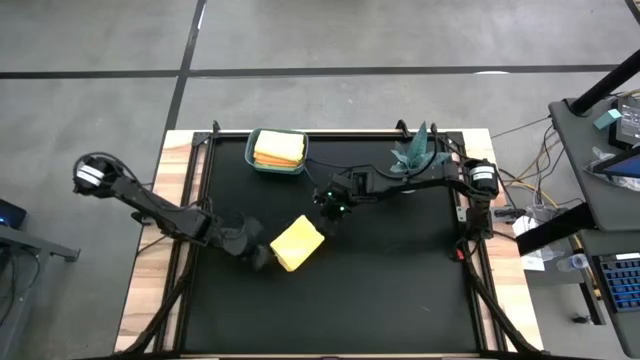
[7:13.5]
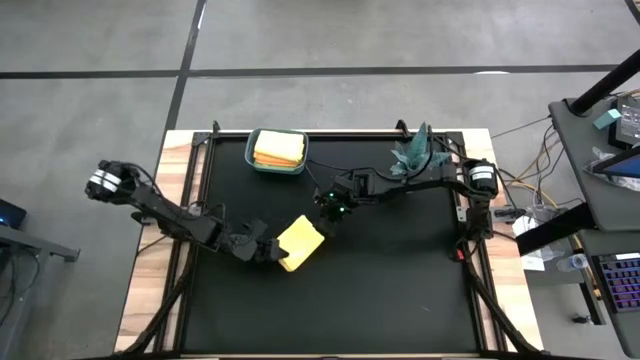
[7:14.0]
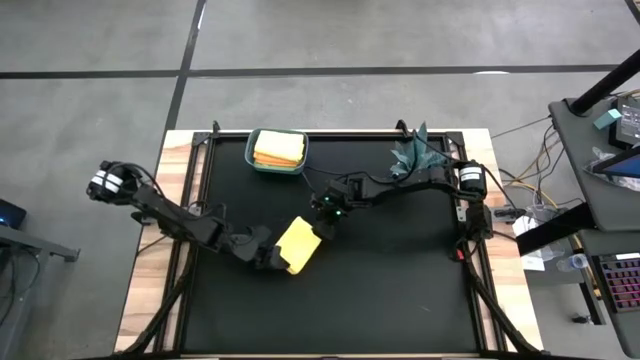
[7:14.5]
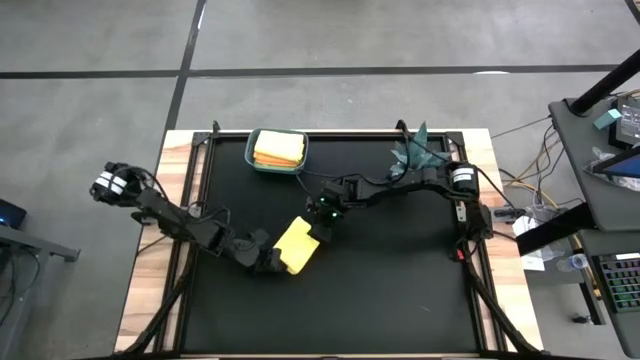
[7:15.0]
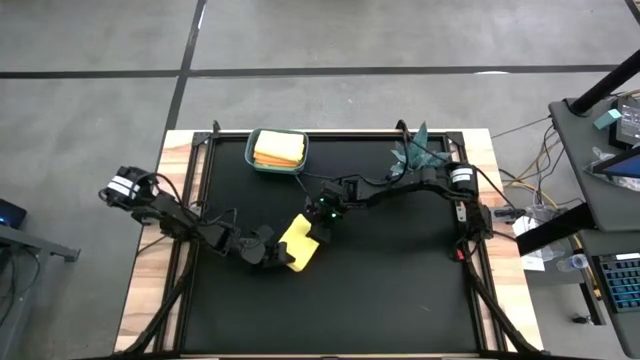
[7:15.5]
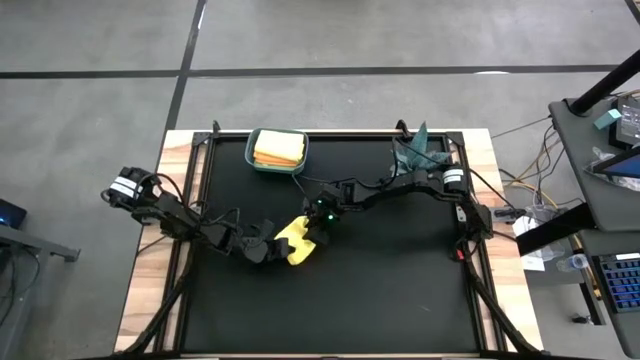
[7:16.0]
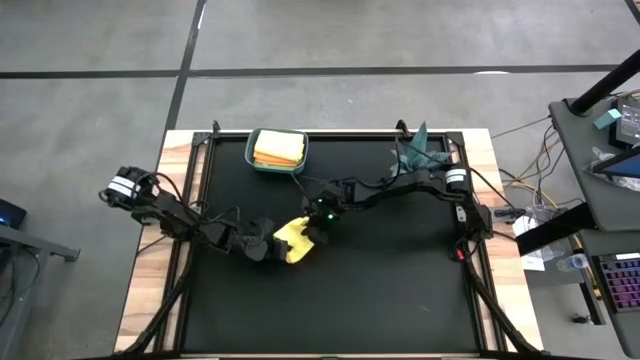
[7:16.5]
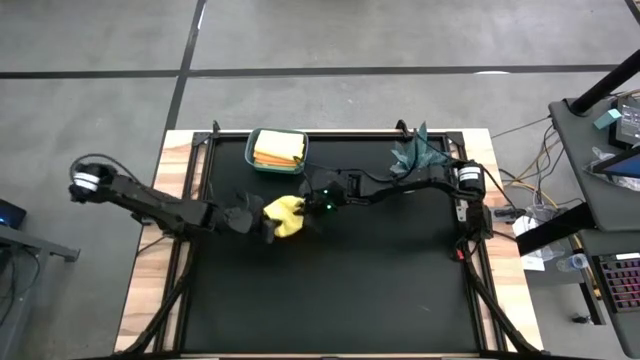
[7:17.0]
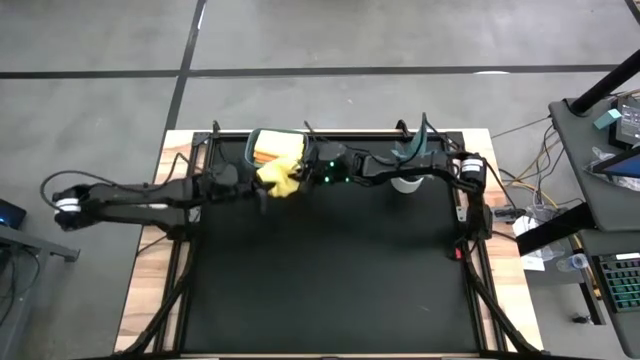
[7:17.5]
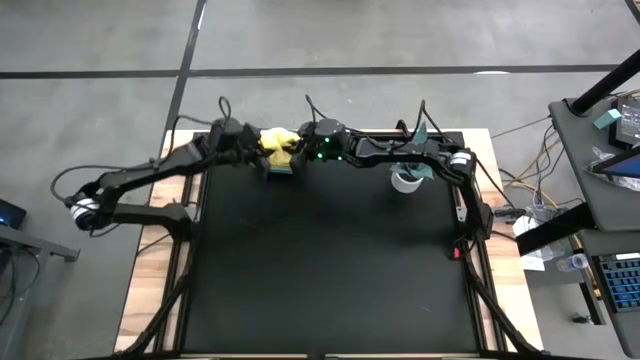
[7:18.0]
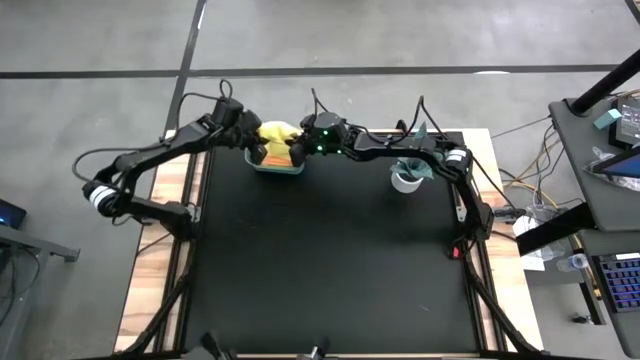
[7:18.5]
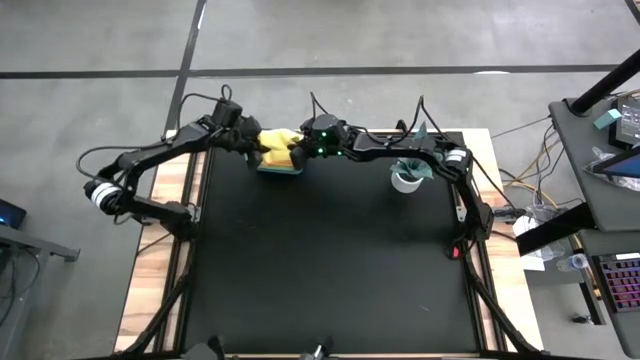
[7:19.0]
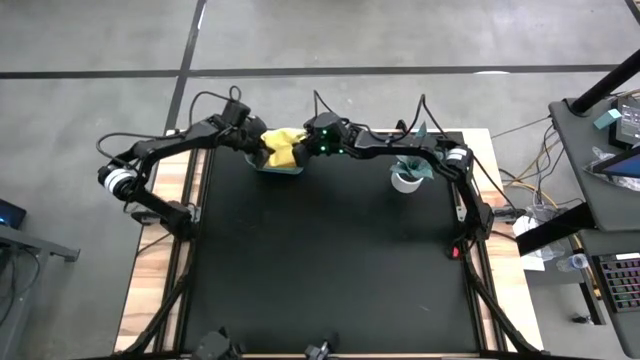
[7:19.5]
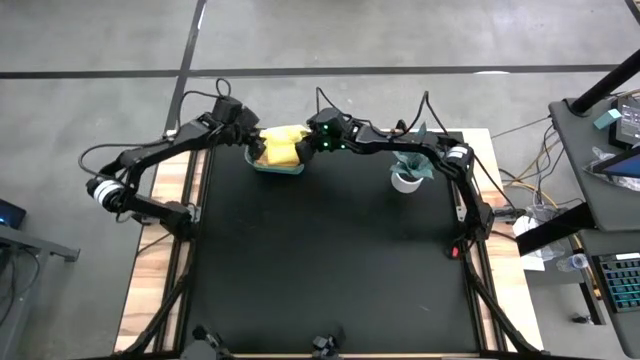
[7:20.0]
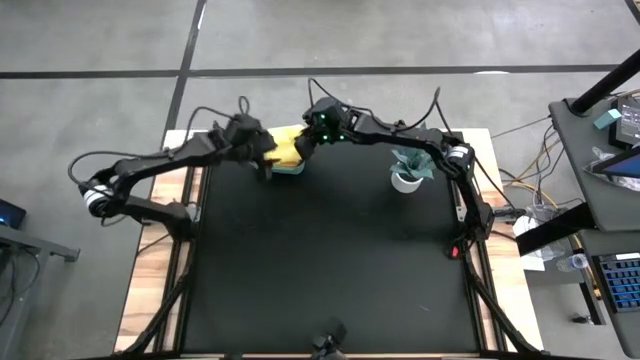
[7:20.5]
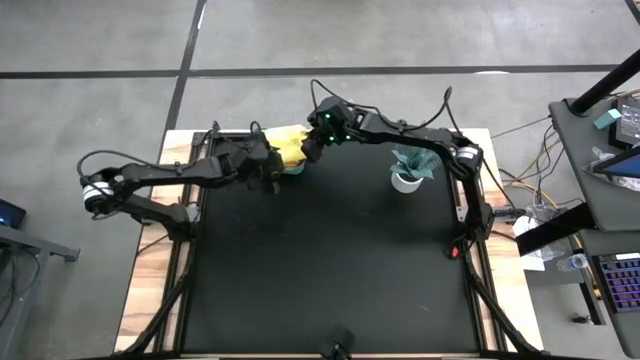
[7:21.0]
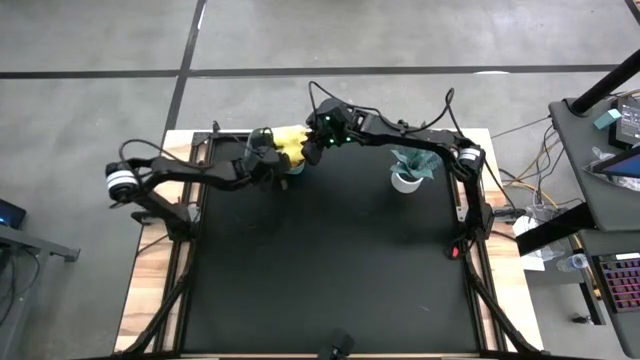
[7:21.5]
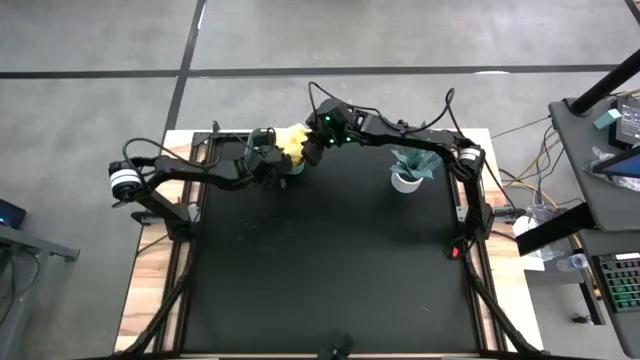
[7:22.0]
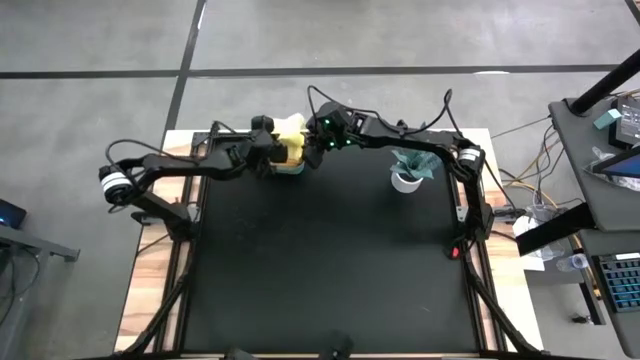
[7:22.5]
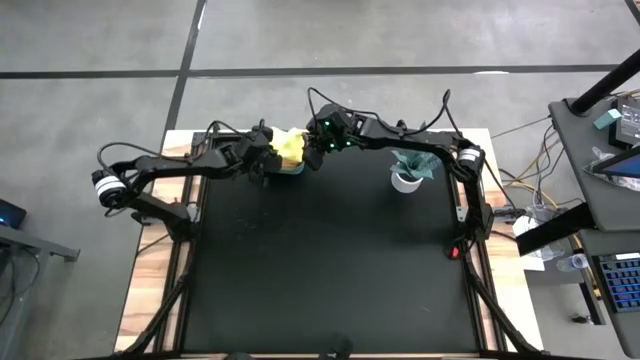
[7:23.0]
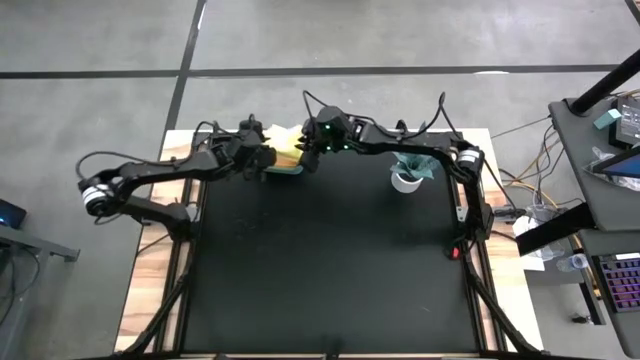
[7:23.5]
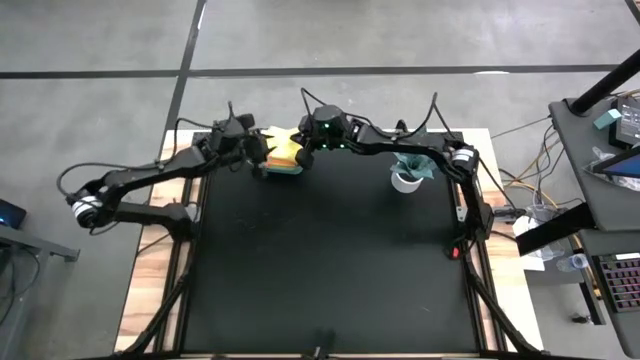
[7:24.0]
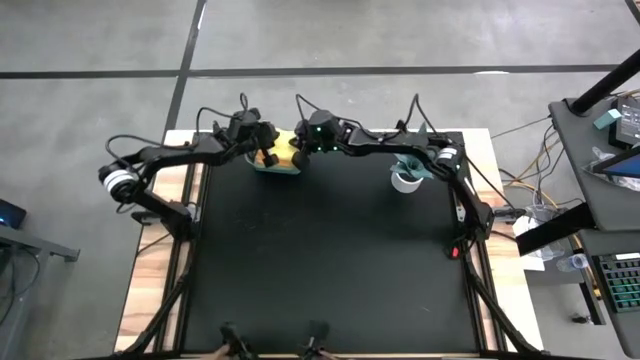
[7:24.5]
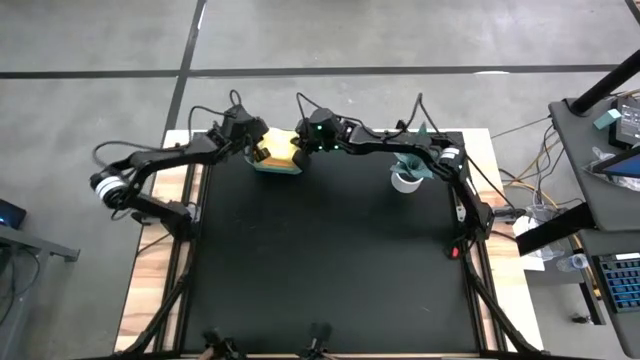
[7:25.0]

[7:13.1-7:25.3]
Task: Fold microfiber towels
Put the yellow microfiber cloth into the blue bin

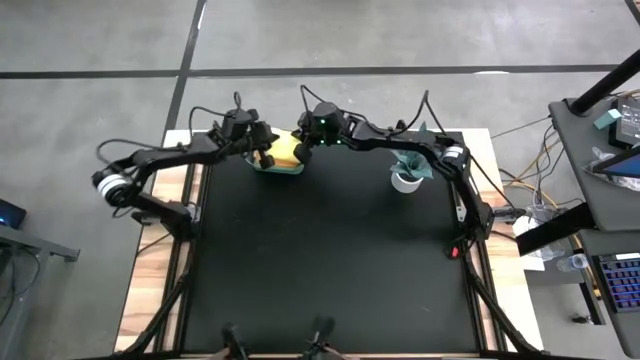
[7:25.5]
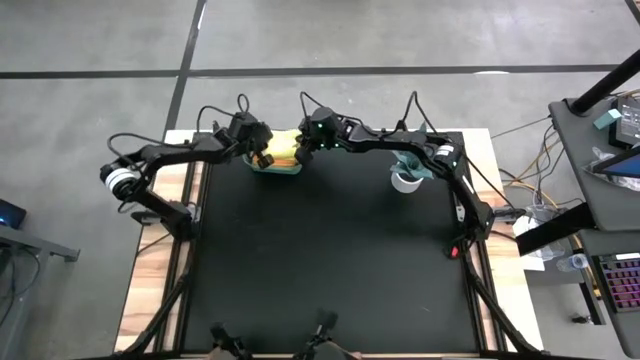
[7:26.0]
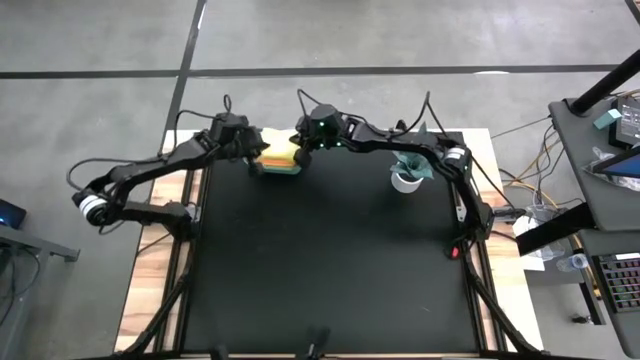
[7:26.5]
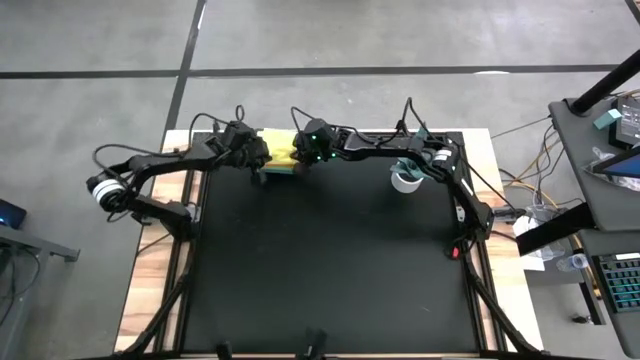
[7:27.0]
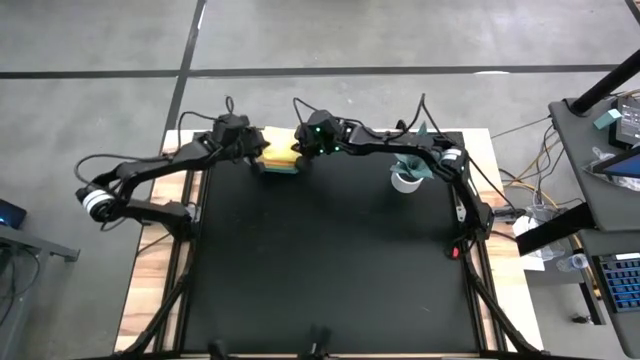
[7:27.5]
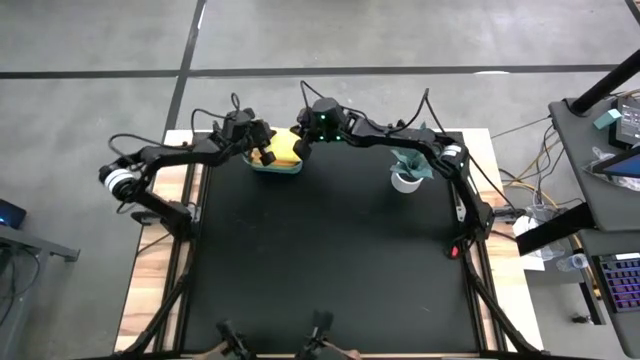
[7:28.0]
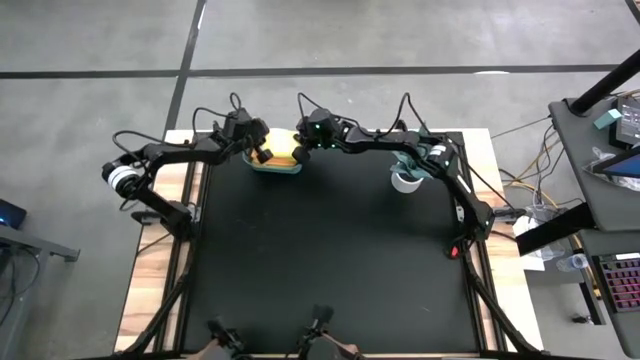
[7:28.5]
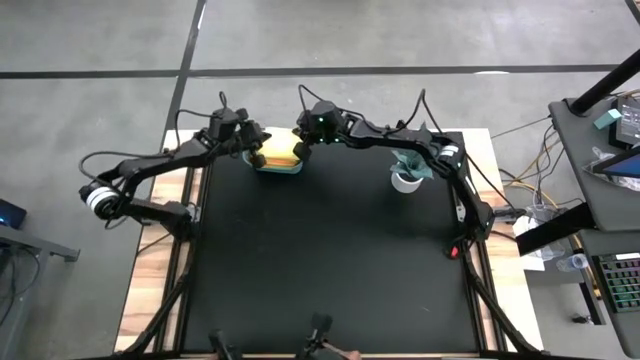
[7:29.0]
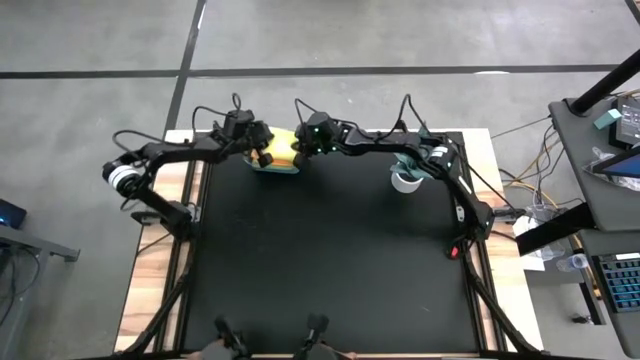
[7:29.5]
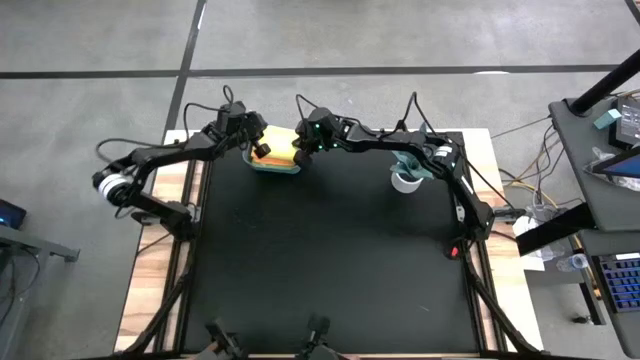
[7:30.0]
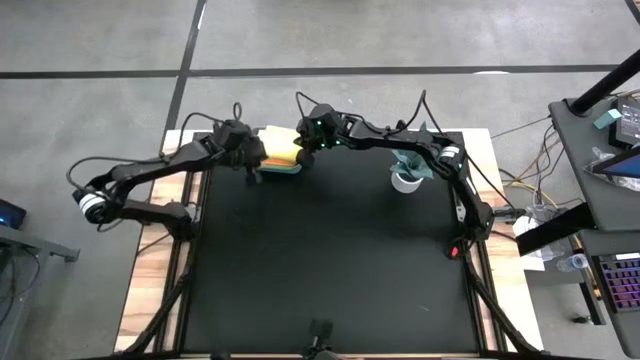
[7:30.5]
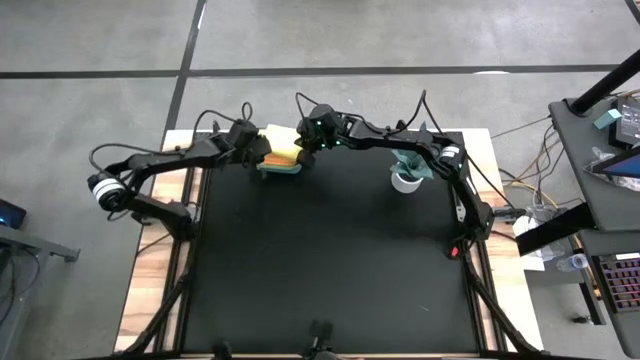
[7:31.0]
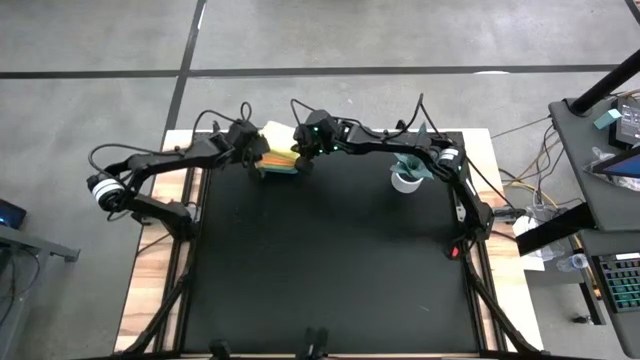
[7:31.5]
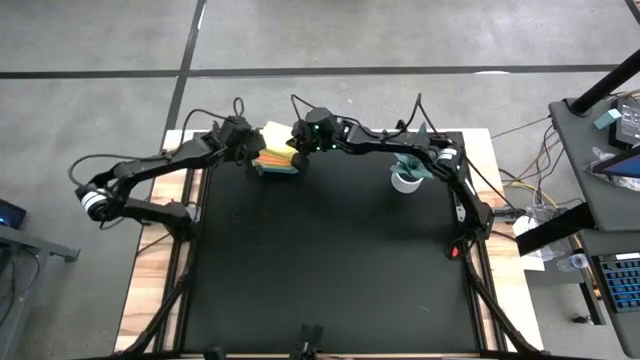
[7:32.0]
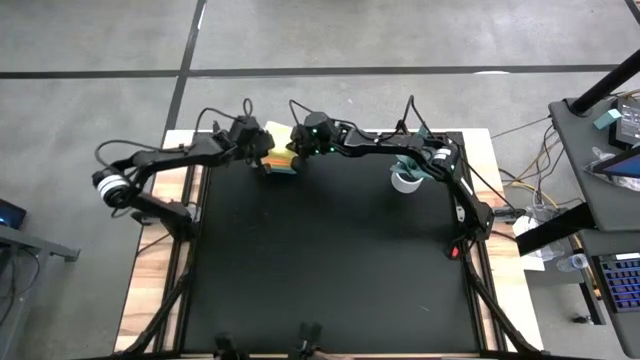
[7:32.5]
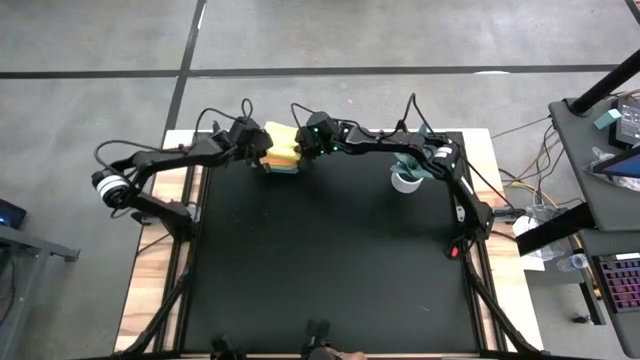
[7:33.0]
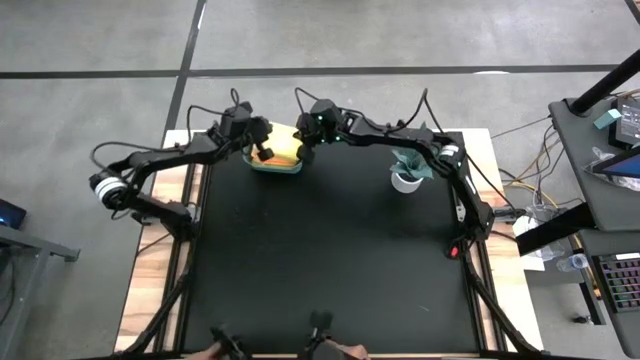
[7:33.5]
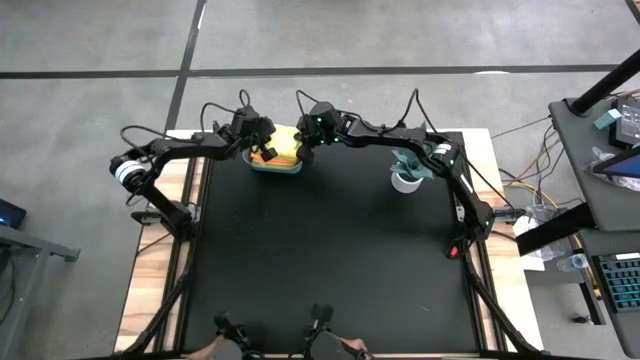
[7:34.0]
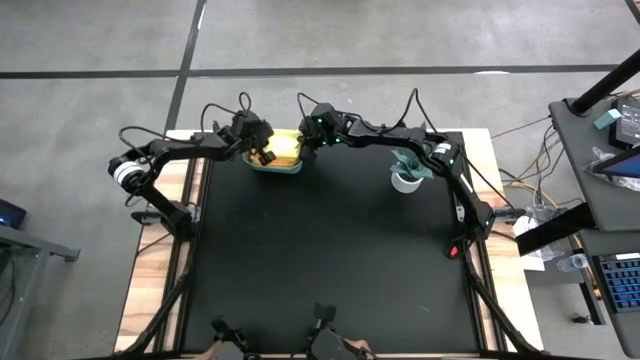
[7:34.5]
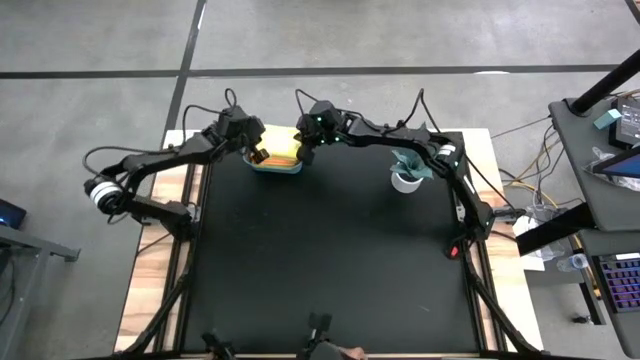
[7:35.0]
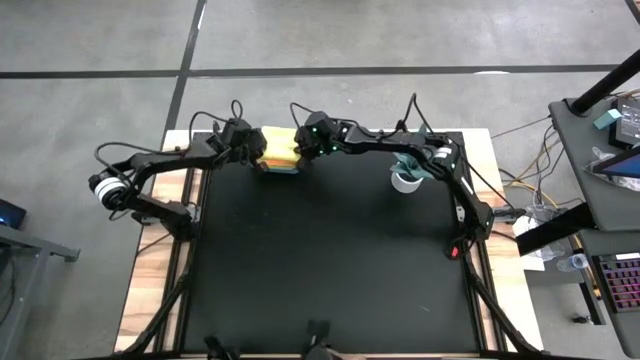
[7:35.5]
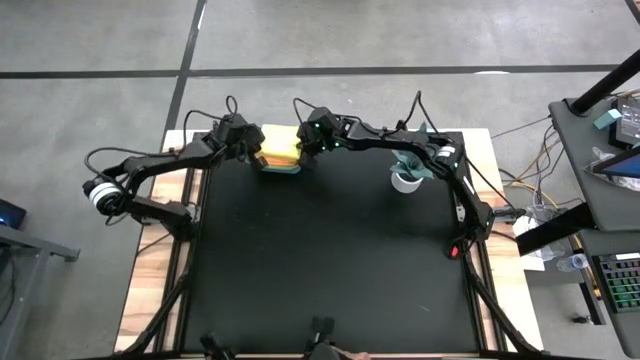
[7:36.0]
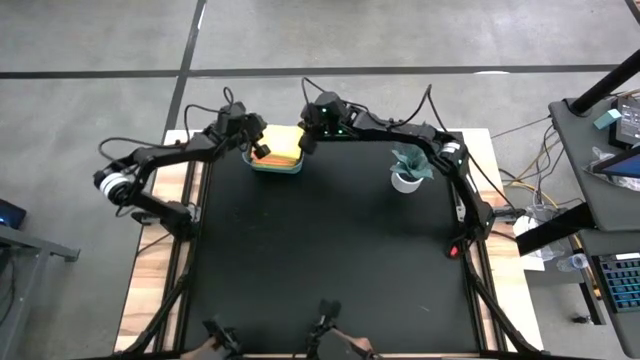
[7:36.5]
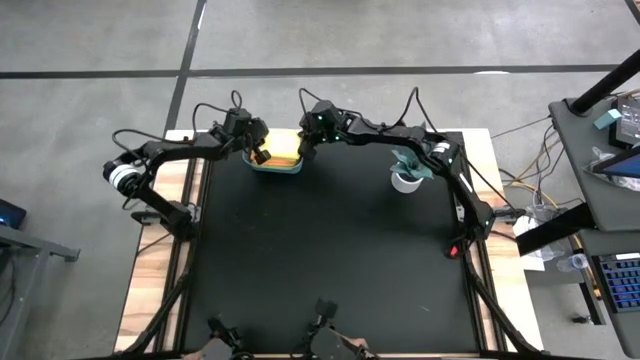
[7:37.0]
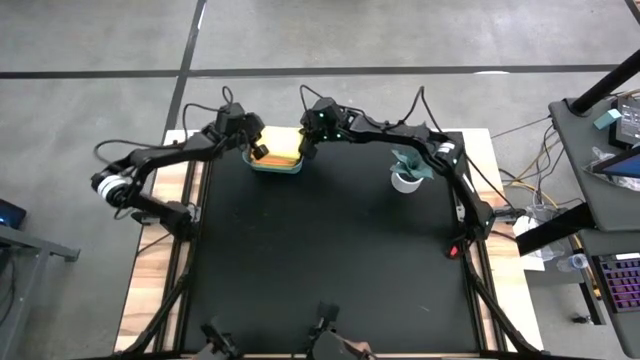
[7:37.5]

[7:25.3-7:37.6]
Put the yellow microfiber cloth into the blue bin
